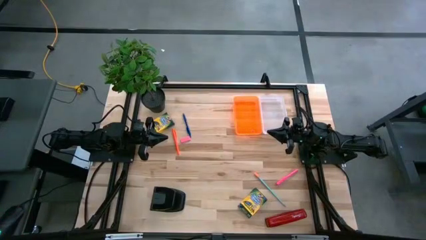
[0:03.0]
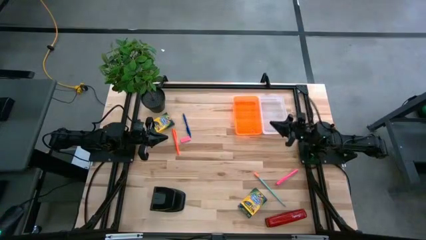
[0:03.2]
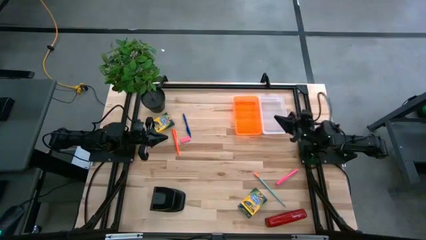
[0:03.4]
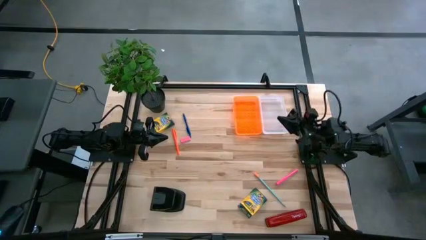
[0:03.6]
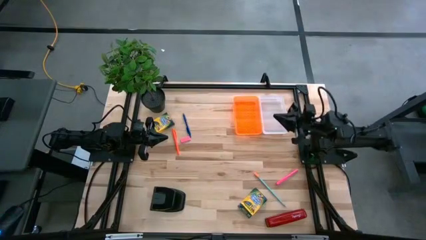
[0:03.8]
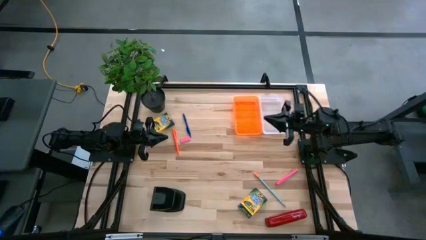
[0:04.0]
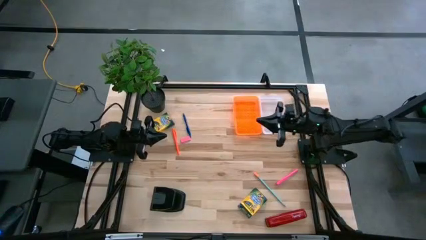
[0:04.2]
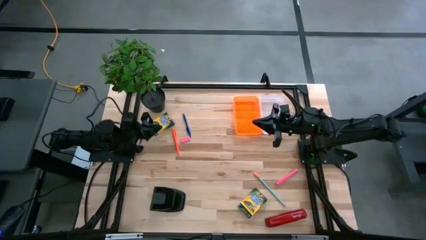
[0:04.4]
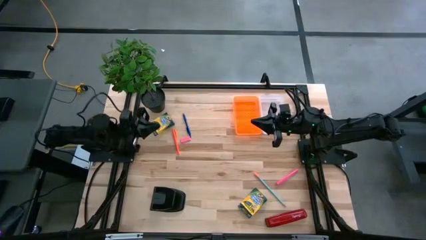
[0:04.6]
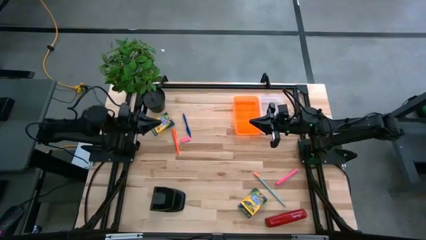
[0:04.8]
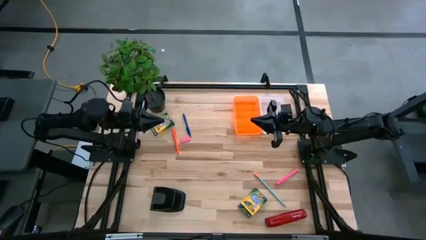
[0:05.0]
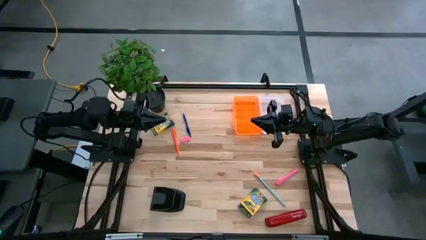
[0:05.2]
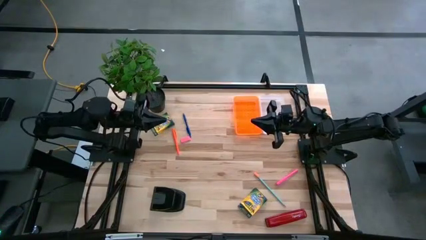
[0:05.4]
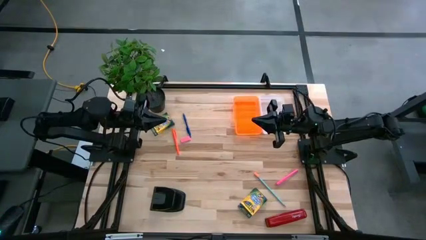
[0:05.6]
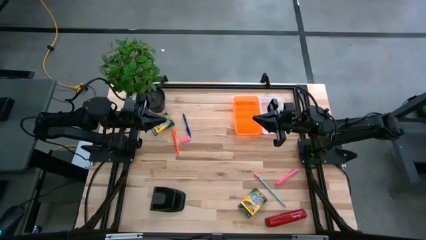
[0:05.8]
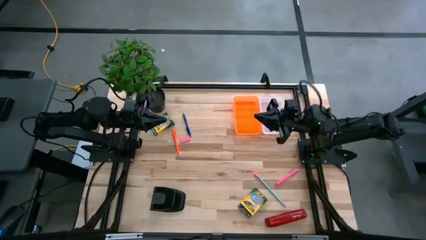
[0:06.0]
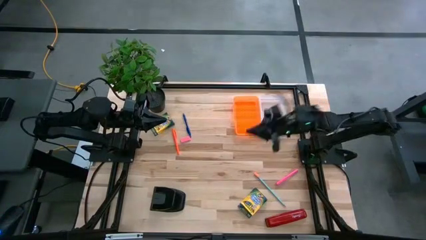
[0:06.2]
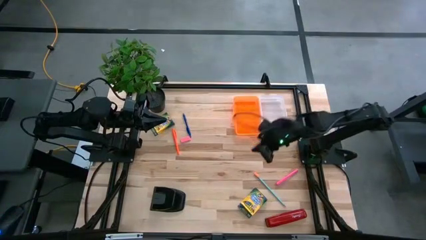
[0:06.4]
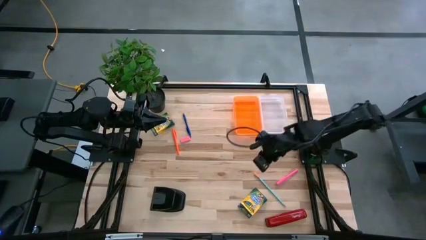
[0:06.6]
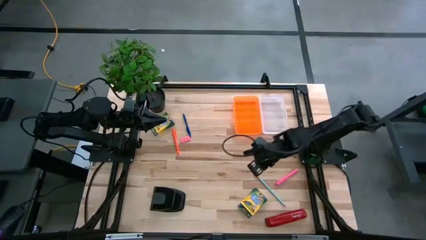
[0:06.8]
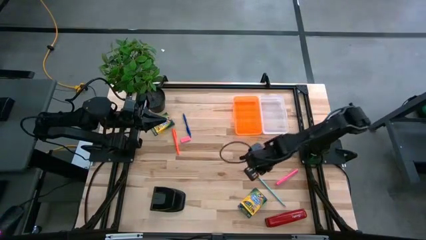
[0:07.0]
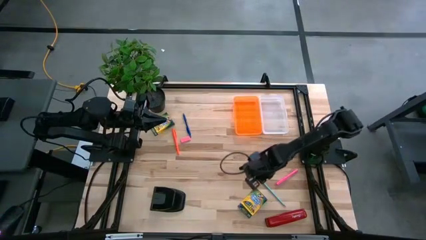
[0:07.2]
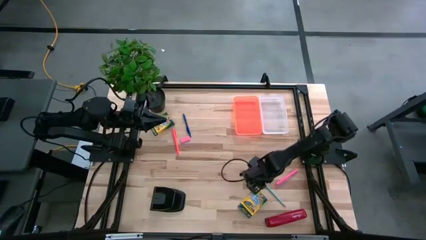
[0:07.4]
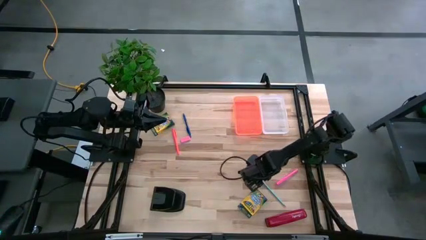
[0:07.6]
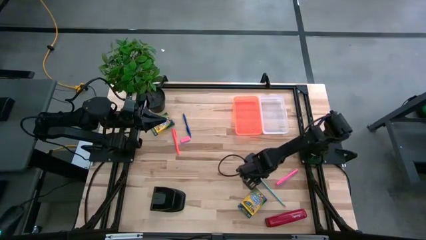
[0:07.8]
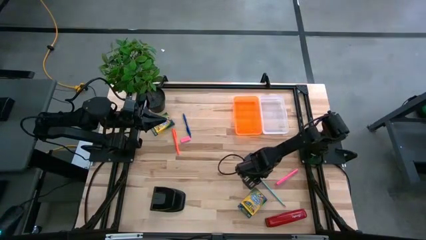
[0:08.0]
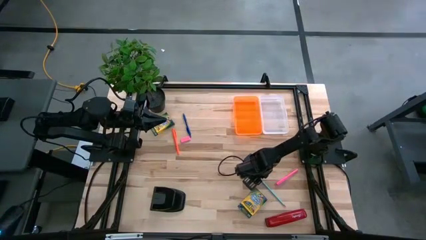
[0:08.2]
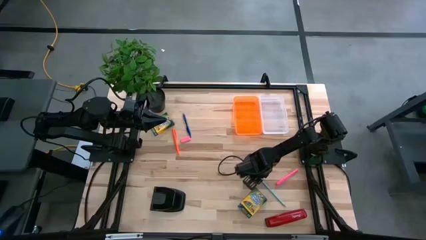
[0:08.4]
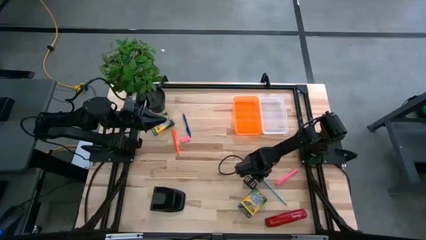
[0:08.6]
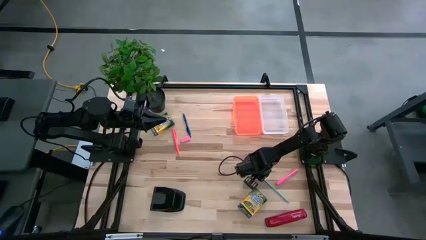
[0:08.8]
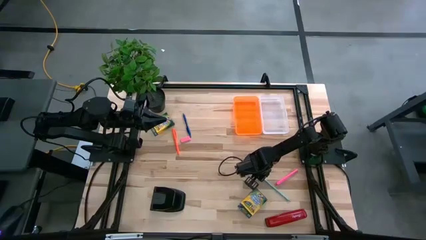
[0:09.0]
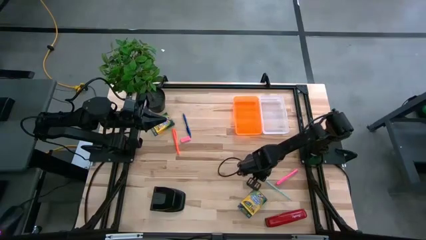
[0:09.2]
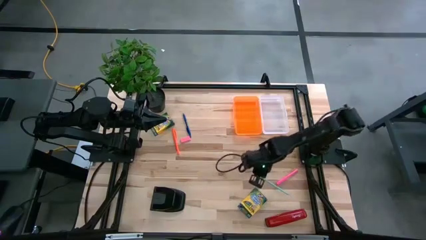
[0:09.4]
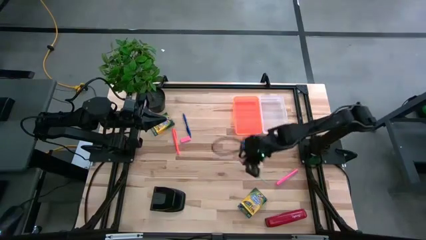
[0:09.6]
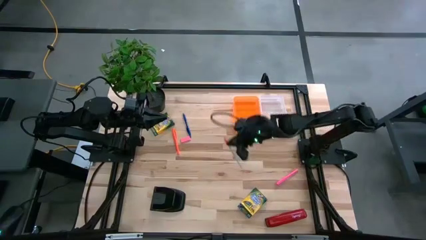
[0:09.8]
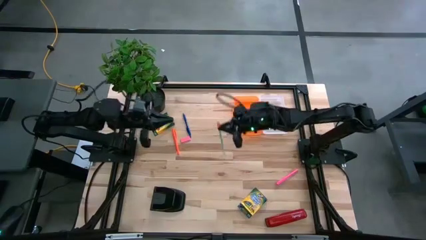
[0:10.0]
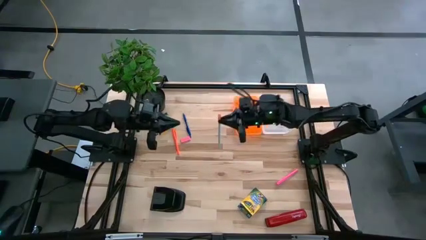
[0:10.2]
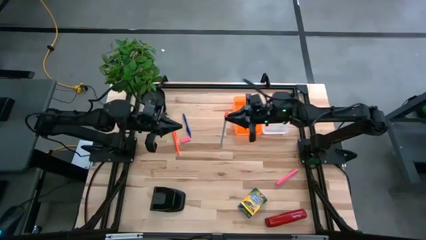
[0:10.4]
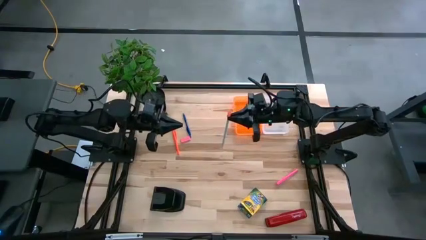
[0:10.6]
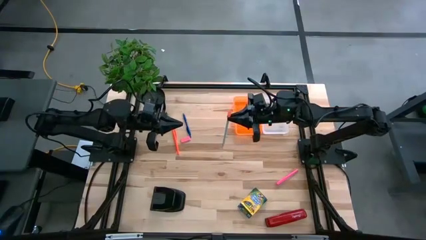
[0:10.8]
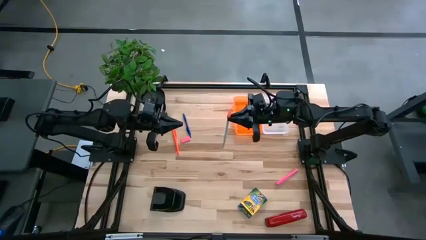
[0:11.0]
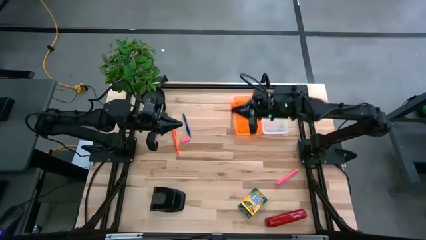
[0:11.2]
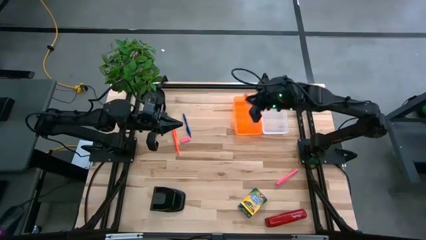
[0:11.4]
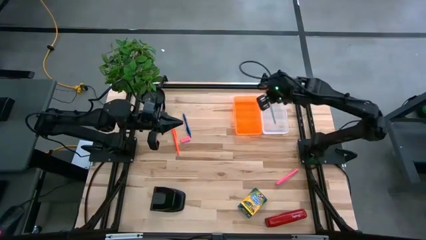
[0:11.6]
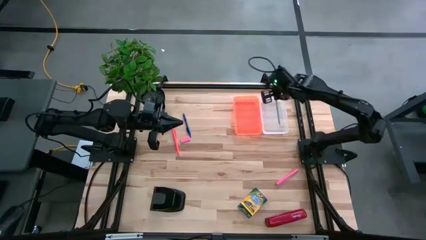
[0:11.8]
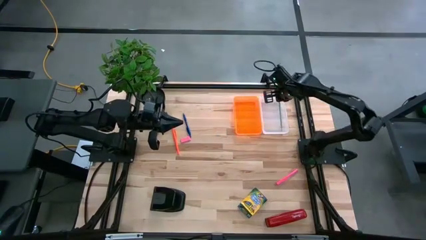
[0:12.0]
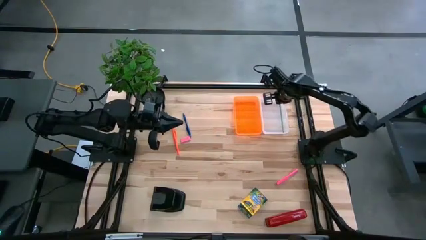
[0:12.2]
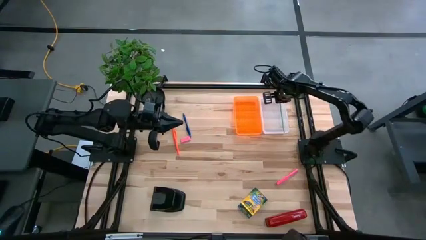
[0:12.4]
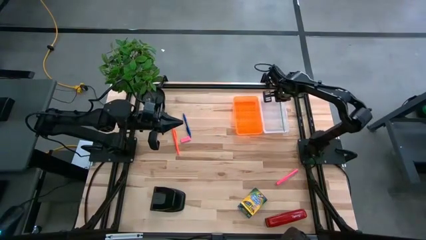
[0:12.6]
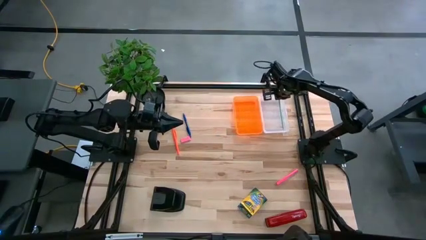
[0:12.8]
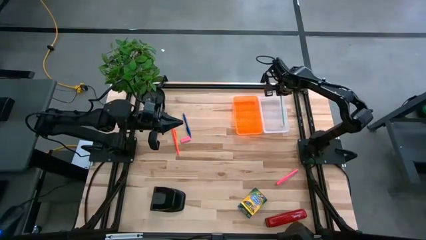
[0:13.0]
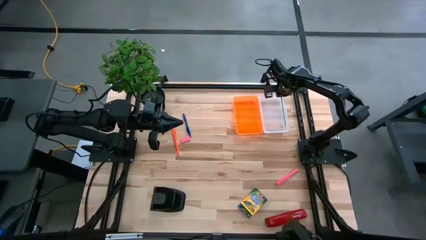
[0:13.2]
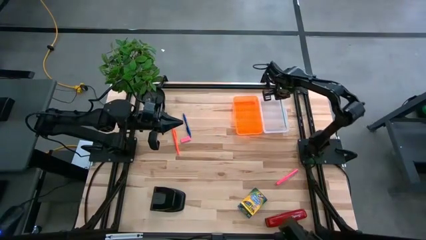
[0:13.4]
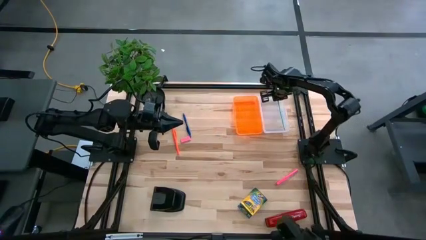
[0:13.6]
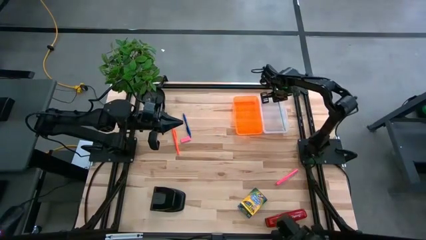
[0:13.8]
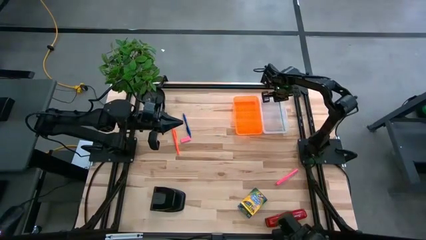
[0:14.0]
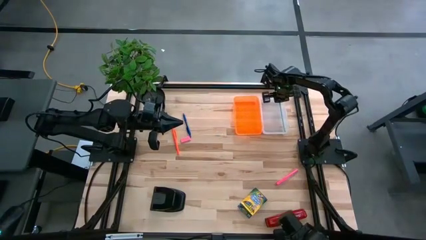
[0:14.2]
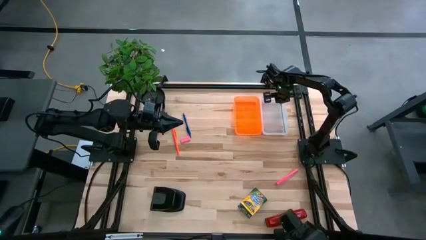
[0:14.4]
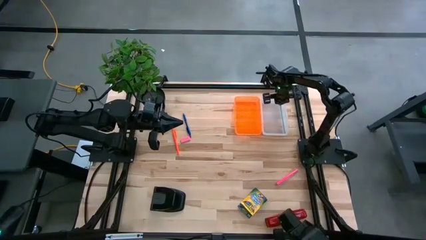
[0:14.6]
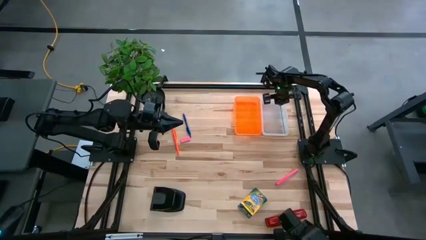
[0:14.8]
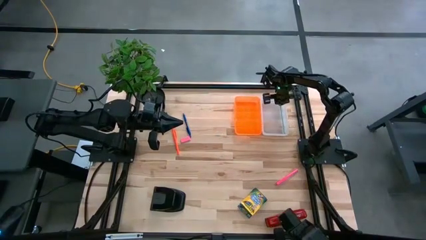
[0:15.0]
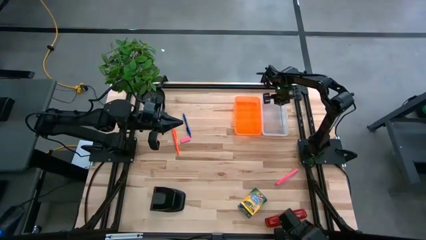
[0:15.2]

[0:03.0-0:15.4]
Task: Pack school essentials
Put the blue pencil into the orange supply box
